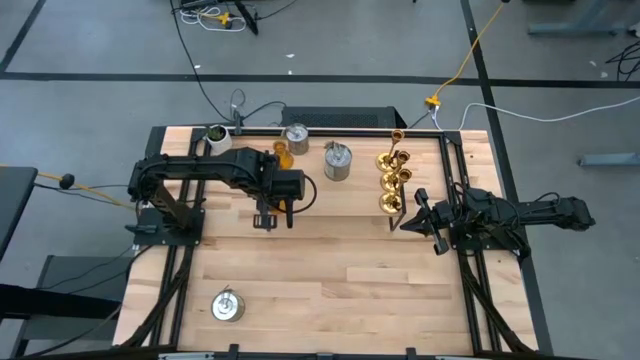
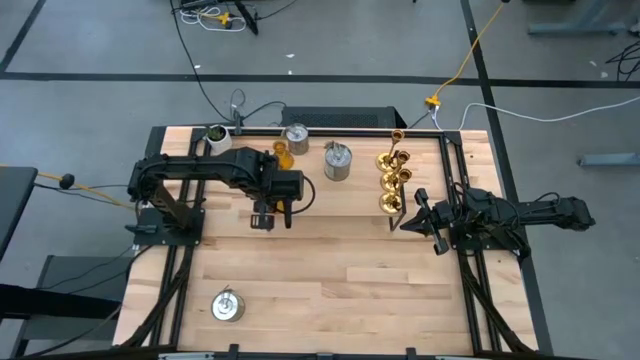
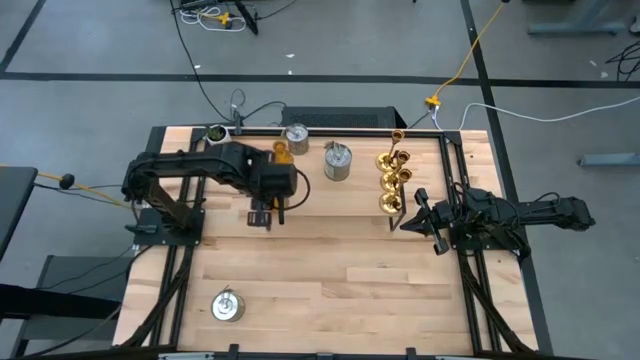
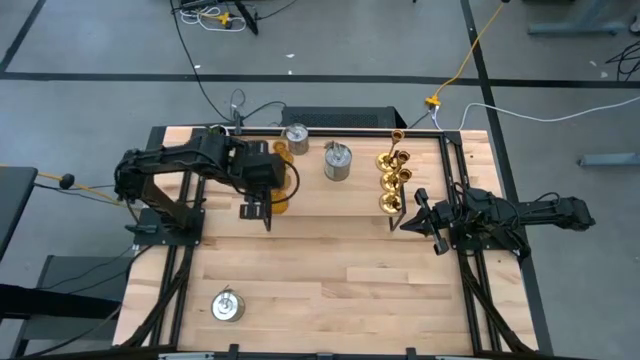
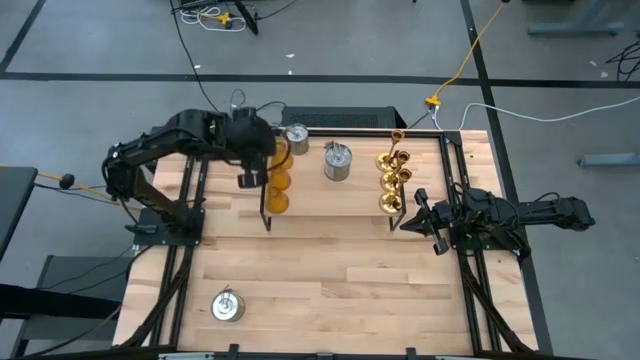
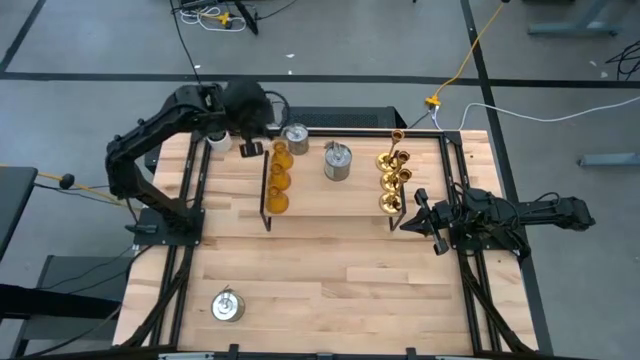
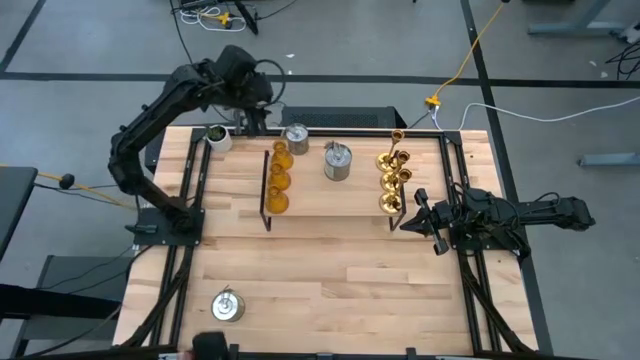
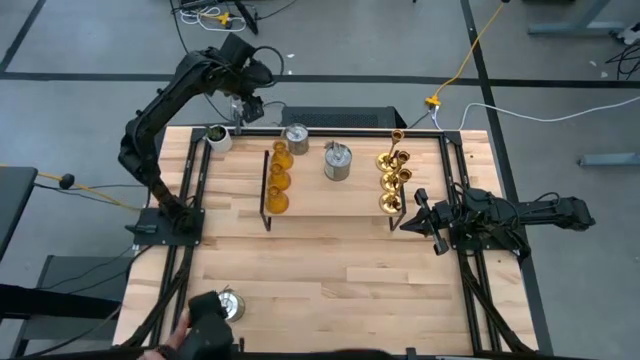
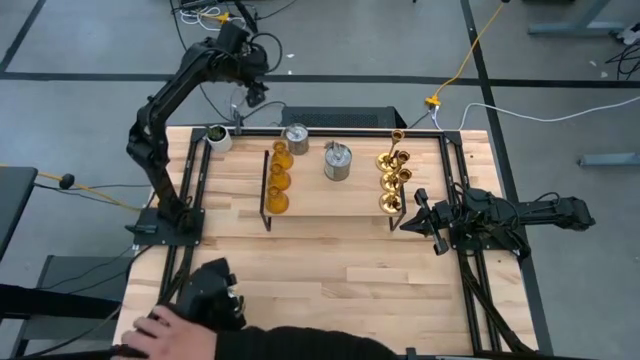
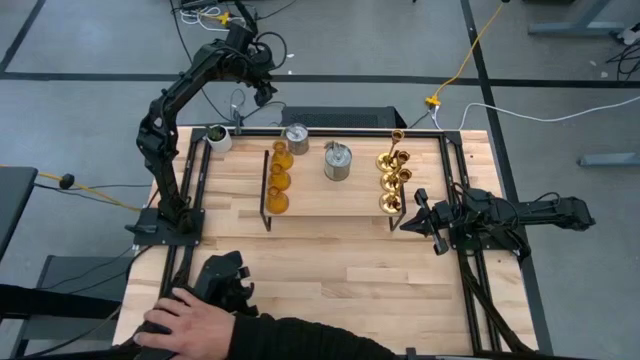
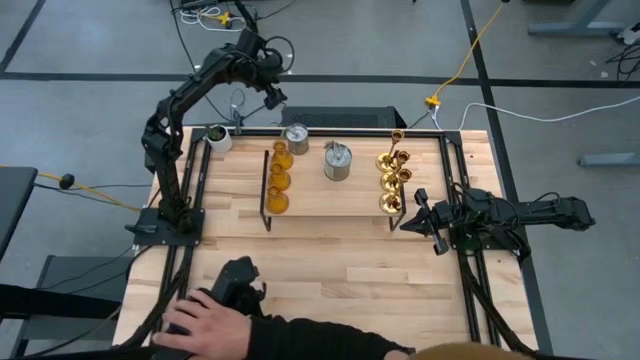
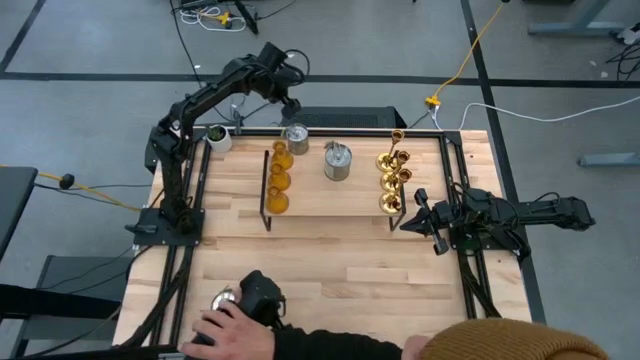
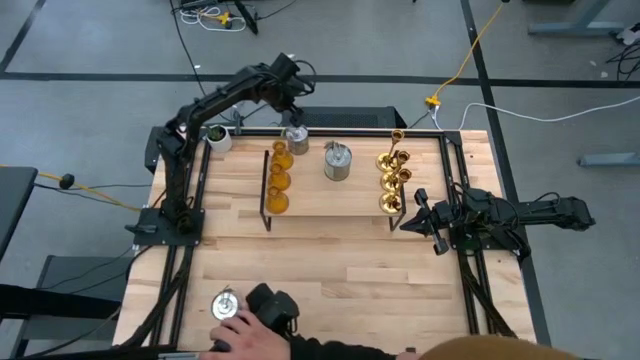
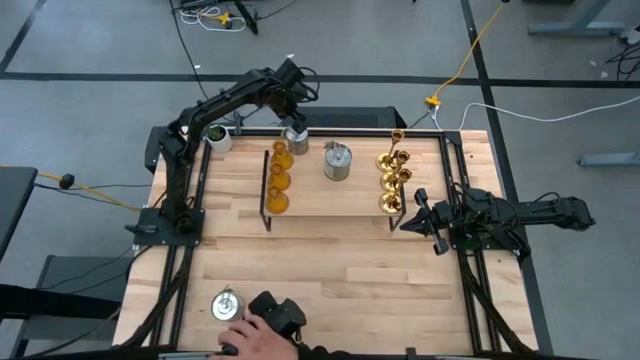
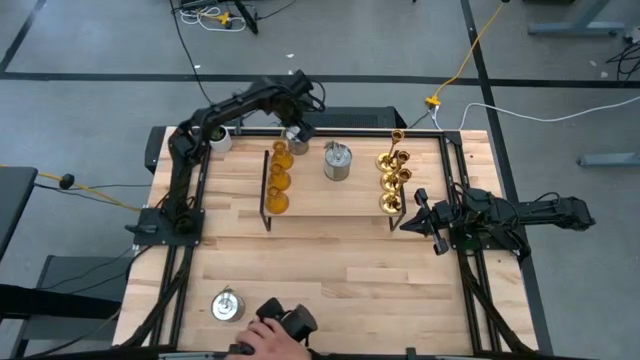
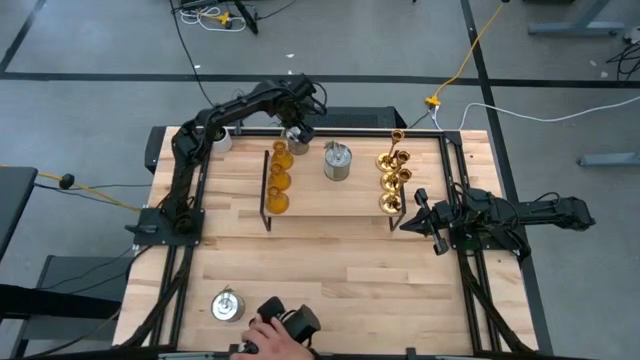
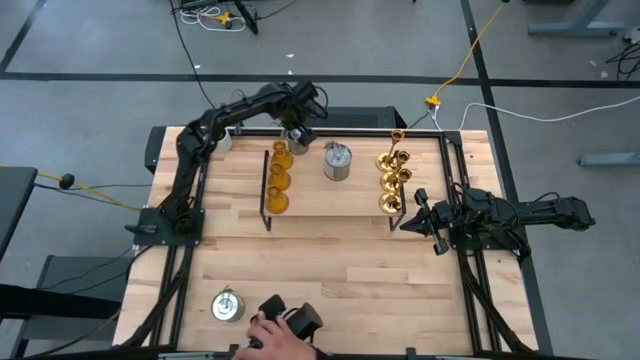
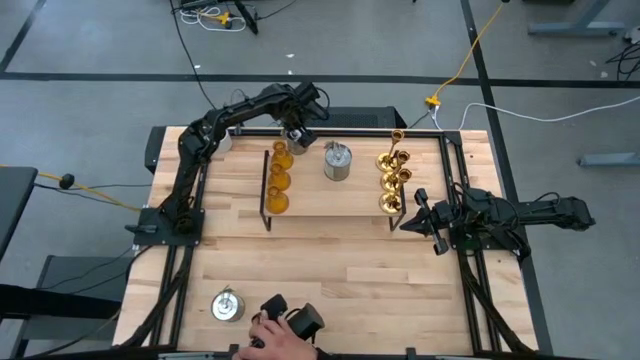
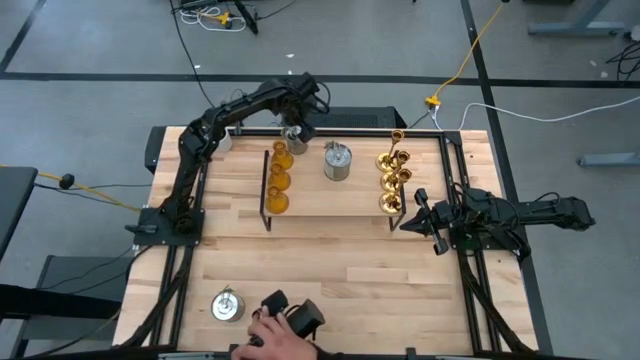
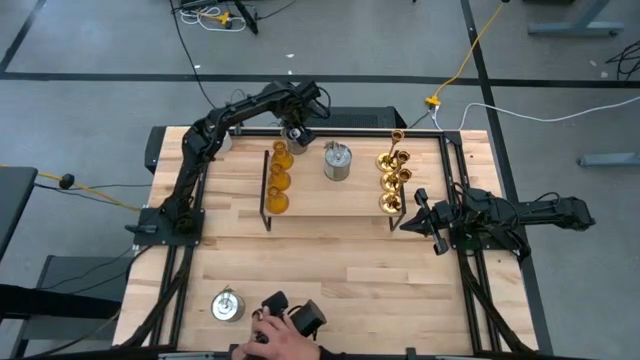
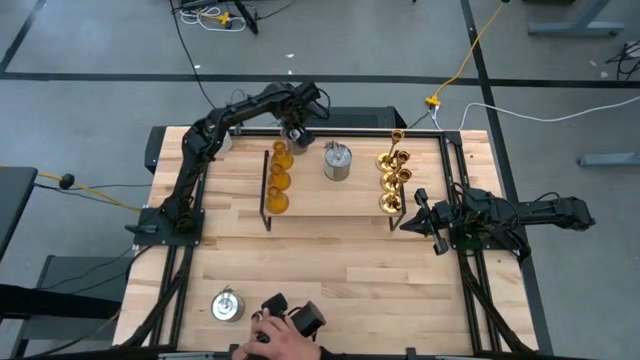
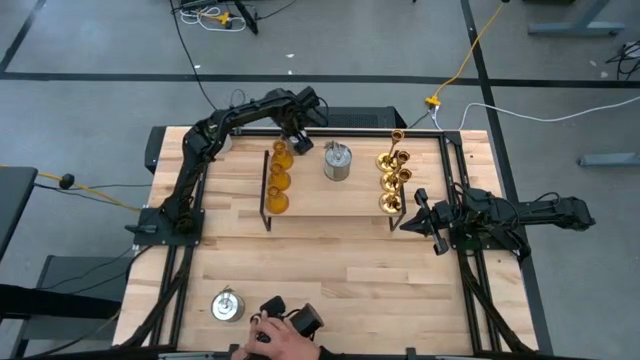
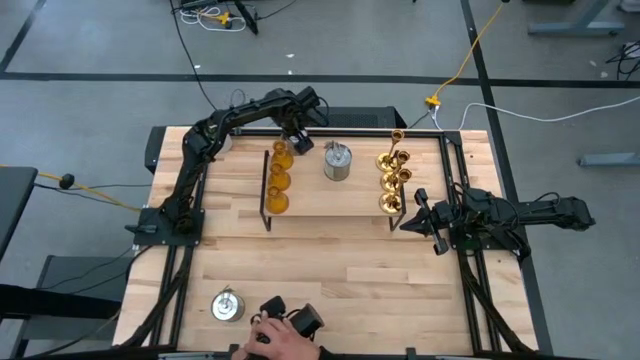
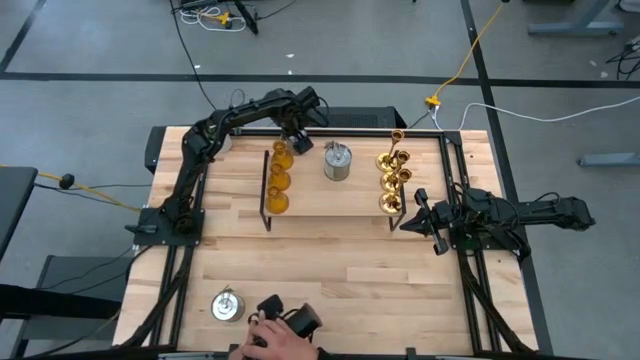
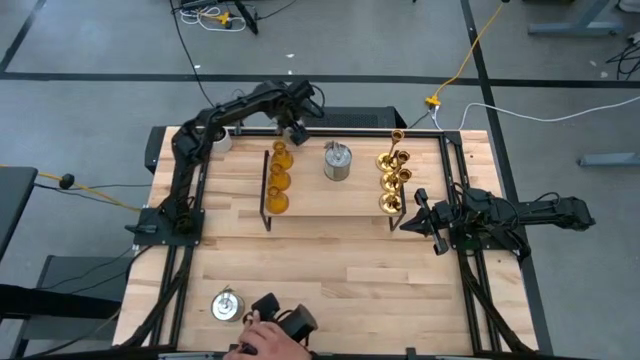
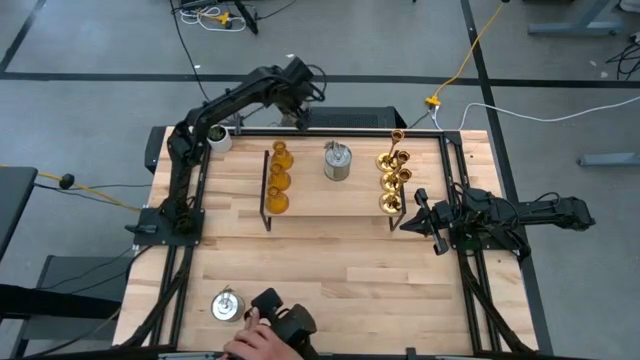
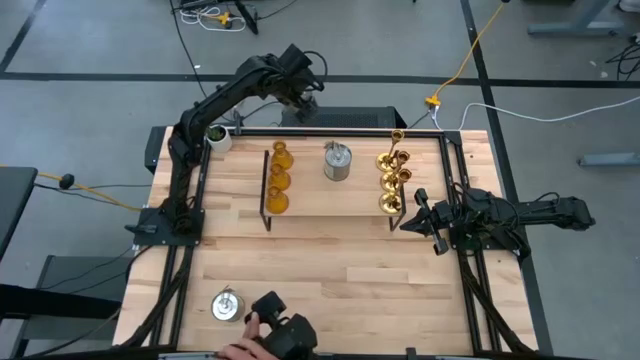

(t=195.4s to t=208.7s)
Task: Pick & Place candle stick holders
Put the top scented candle on the shelf

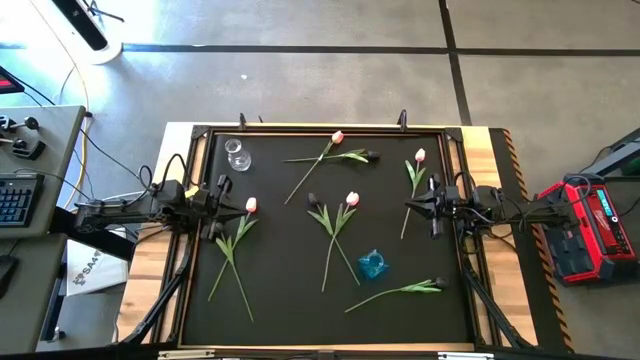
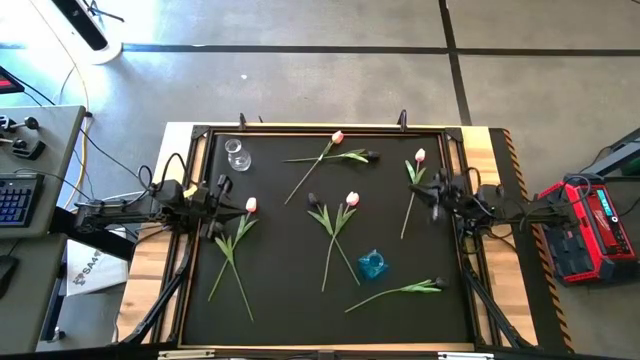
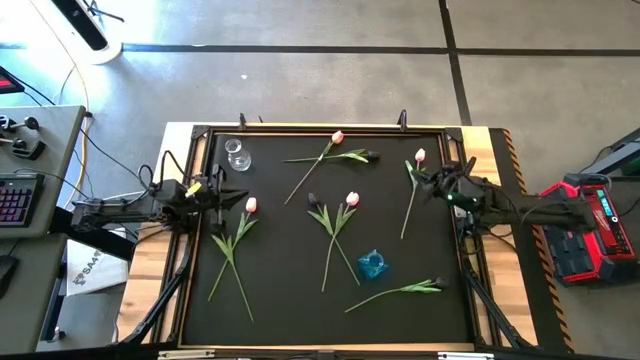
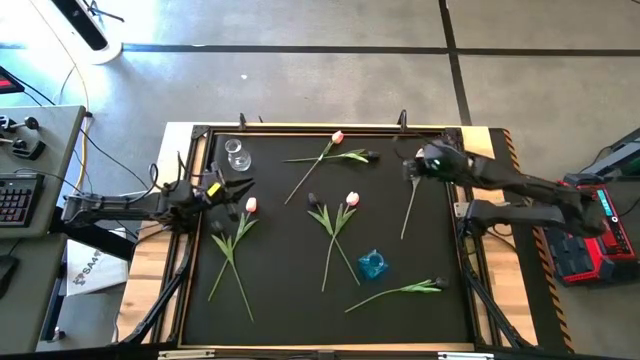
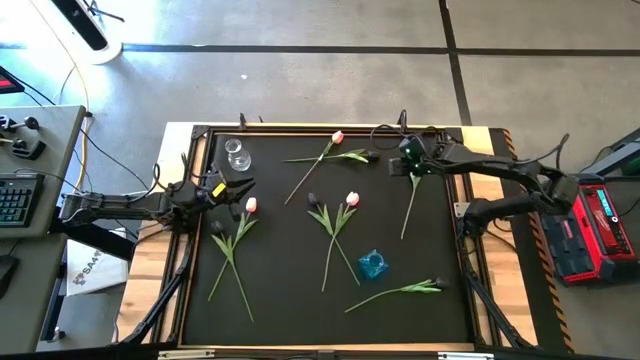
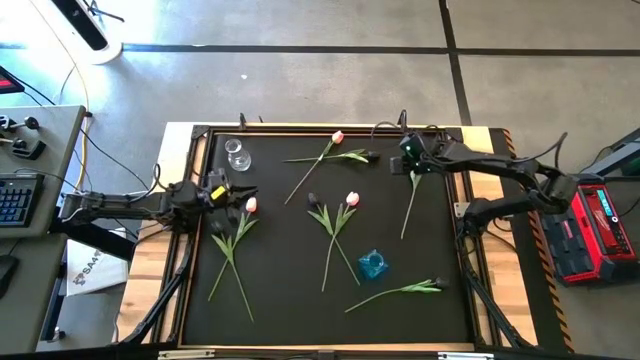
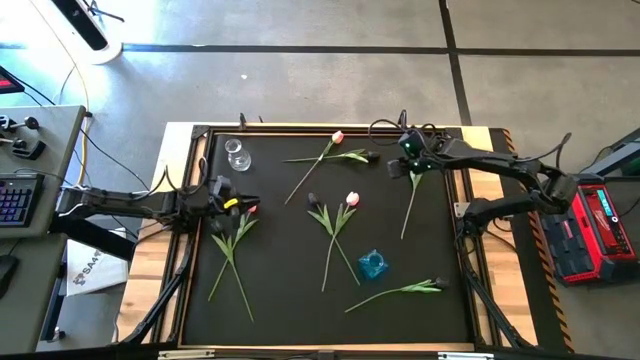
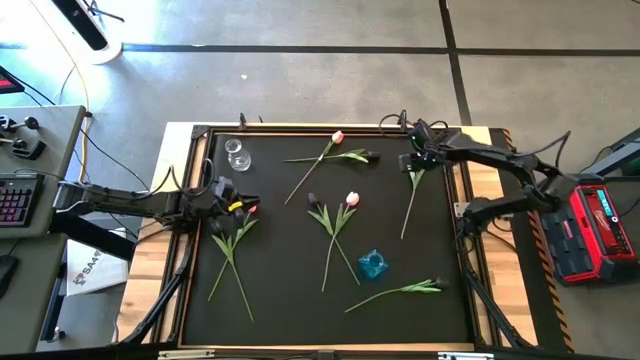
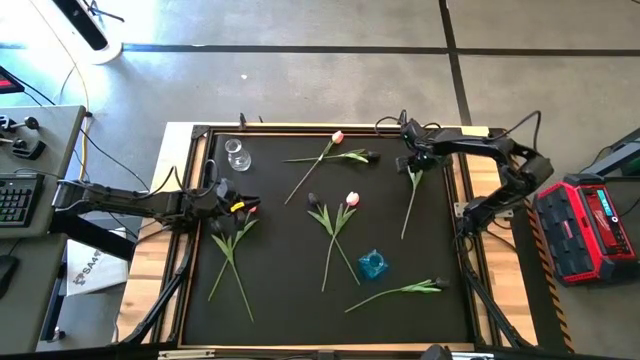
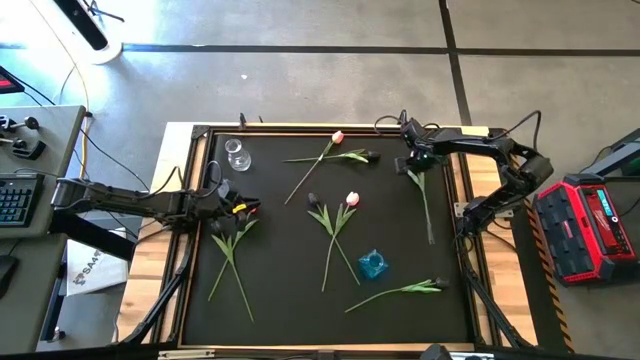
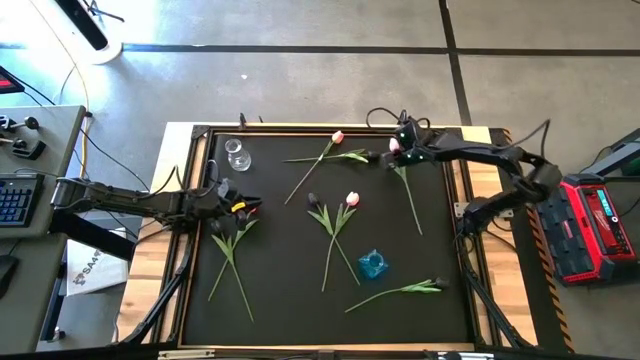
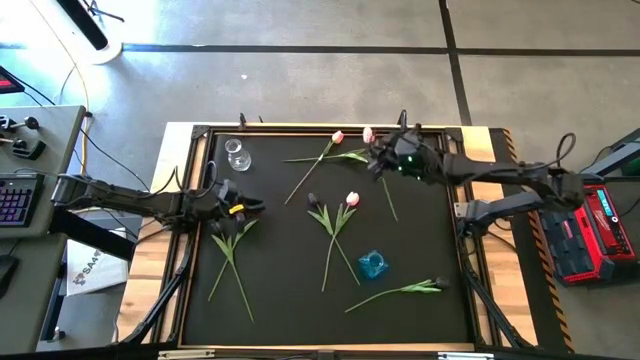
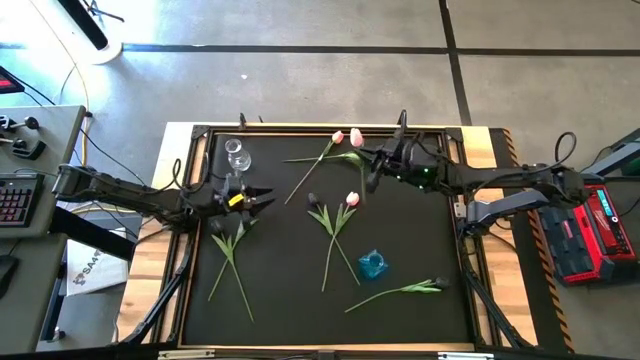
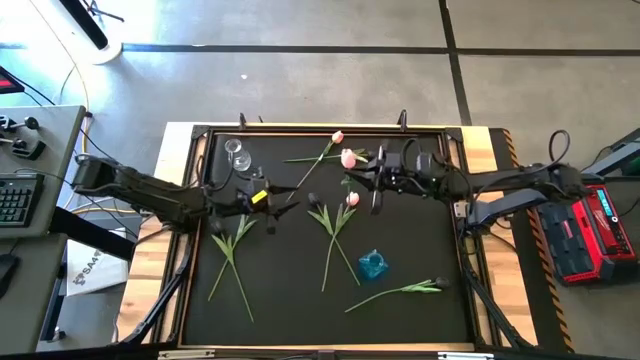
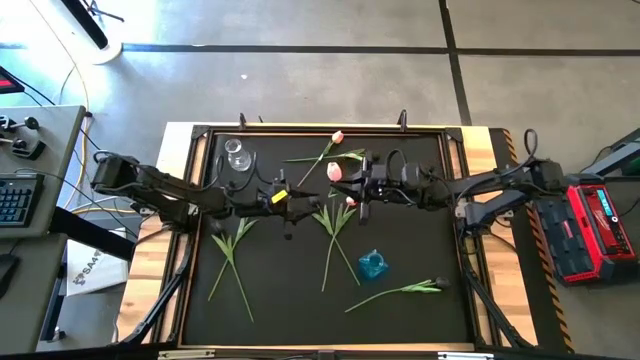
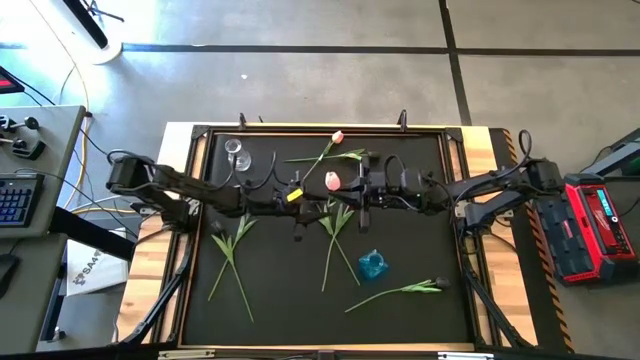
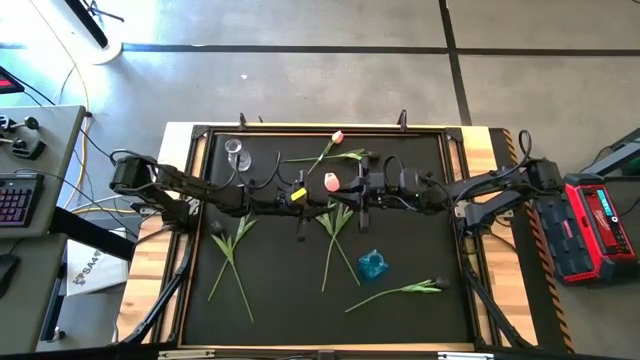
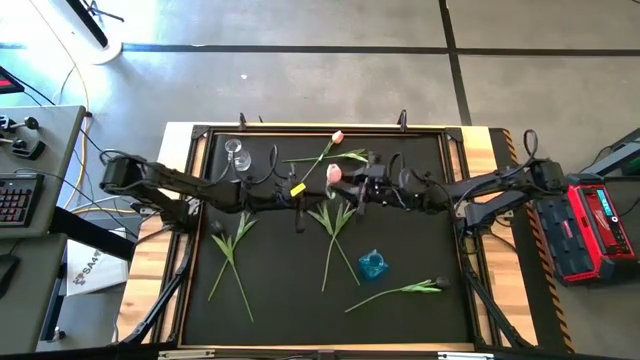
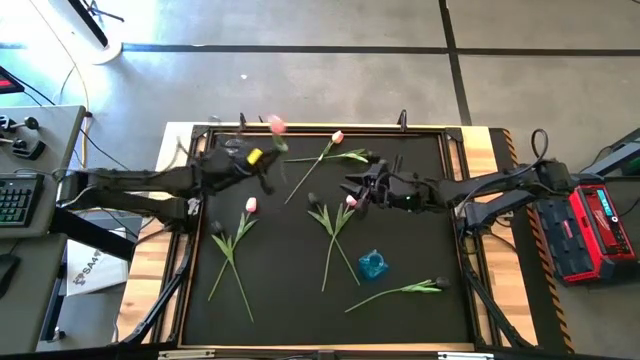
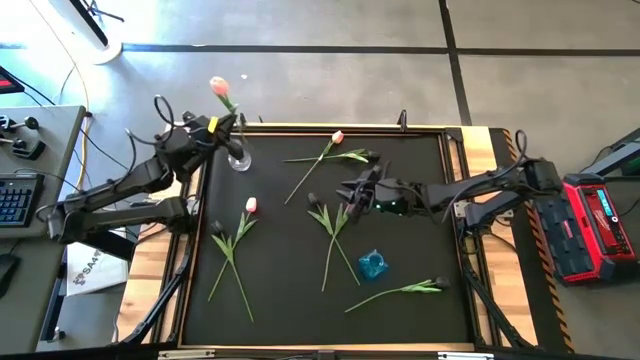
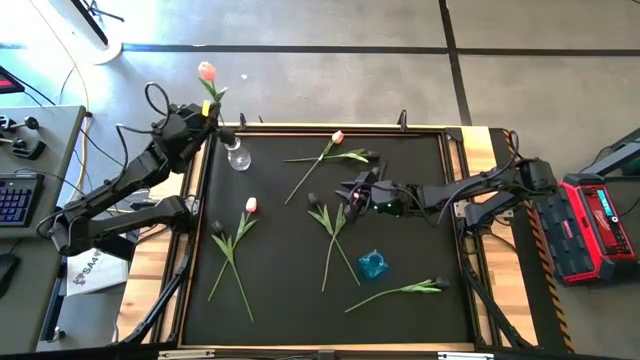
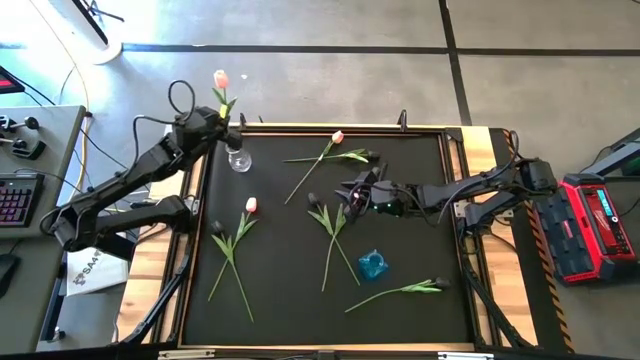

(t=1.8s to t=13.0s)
Task: Sort flowers into vase by color
Put the top right pink flower into the transparent vase
